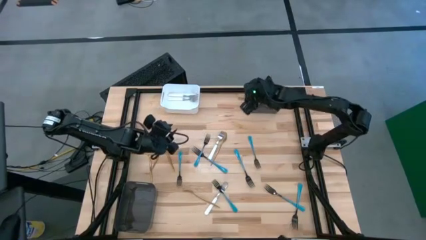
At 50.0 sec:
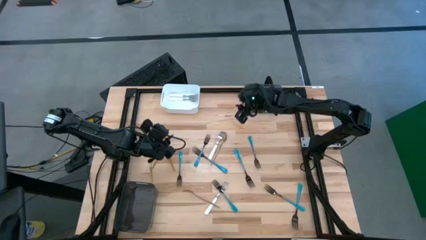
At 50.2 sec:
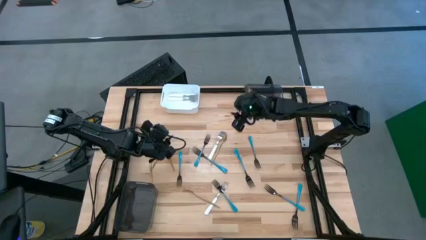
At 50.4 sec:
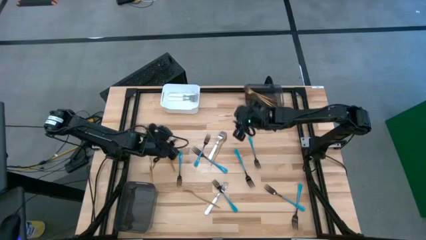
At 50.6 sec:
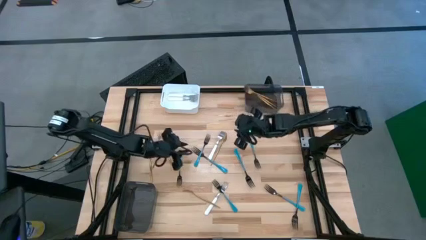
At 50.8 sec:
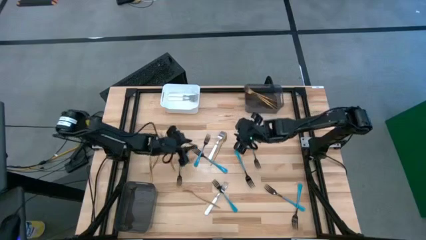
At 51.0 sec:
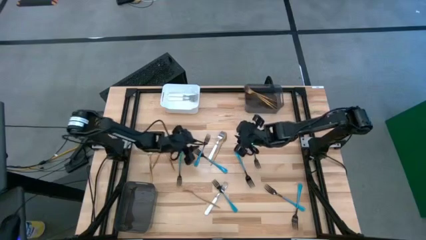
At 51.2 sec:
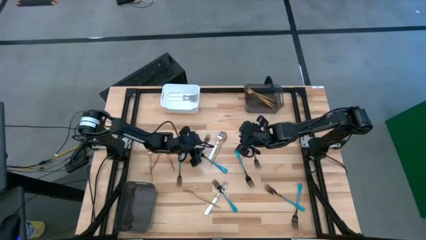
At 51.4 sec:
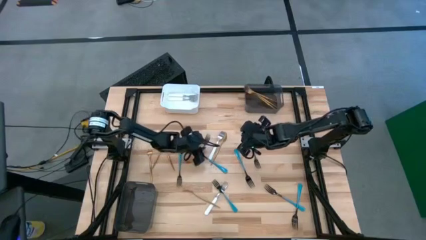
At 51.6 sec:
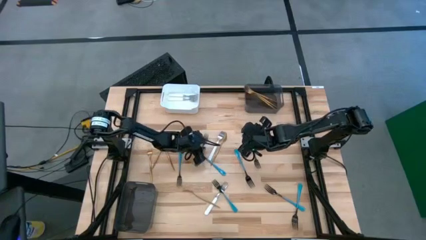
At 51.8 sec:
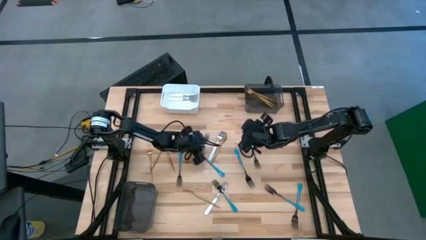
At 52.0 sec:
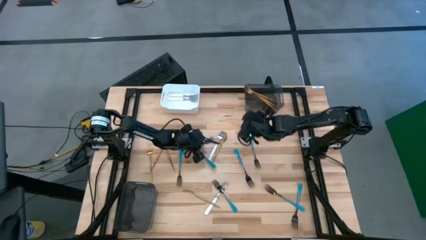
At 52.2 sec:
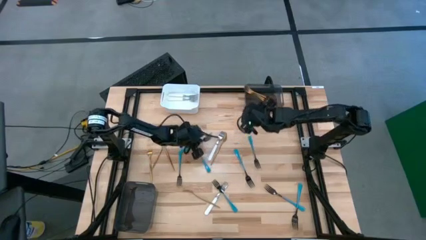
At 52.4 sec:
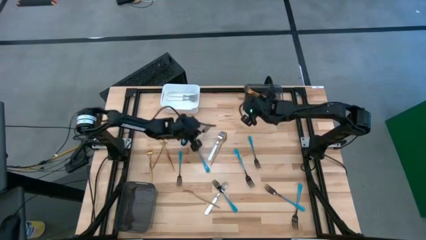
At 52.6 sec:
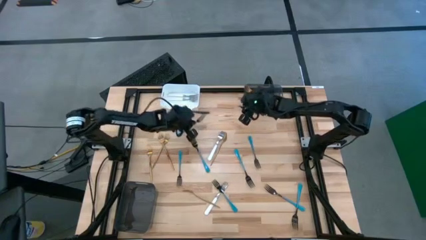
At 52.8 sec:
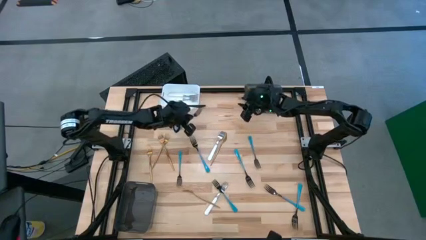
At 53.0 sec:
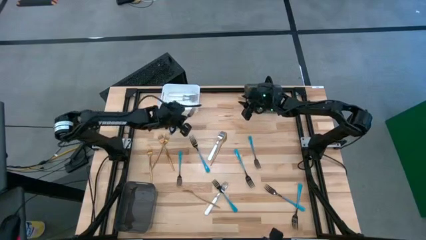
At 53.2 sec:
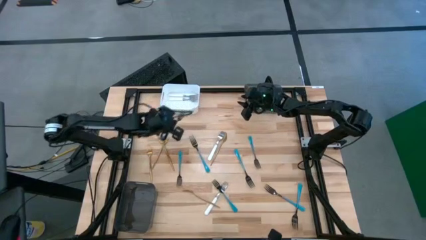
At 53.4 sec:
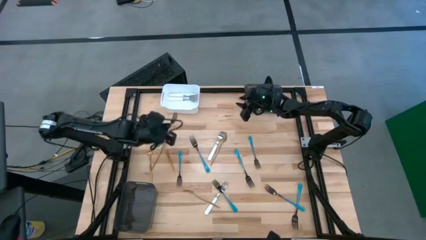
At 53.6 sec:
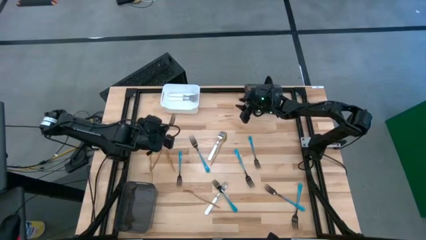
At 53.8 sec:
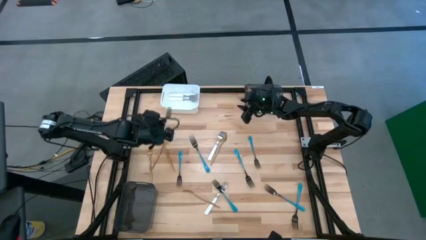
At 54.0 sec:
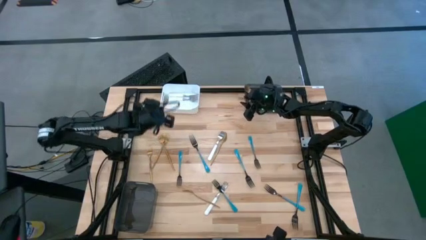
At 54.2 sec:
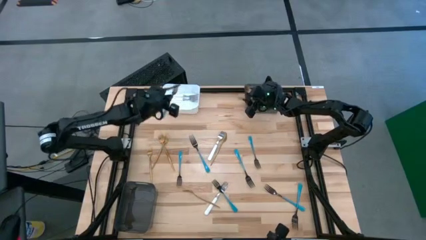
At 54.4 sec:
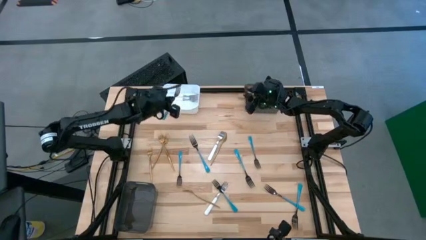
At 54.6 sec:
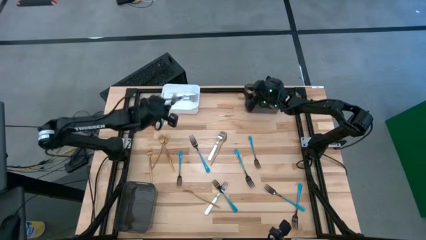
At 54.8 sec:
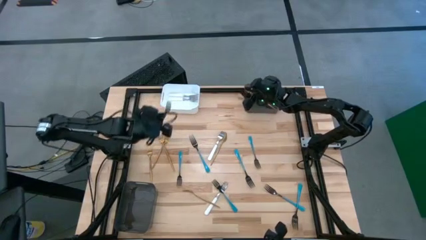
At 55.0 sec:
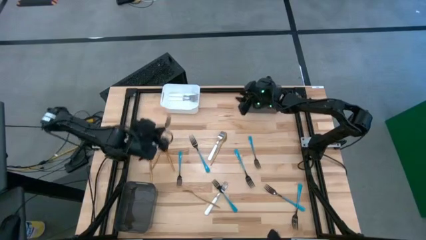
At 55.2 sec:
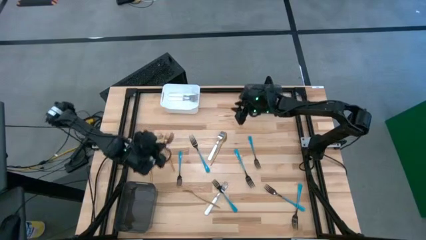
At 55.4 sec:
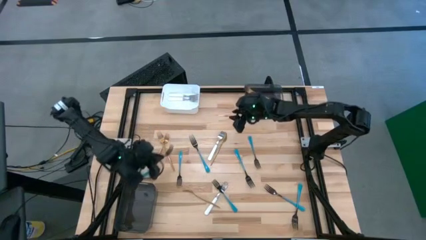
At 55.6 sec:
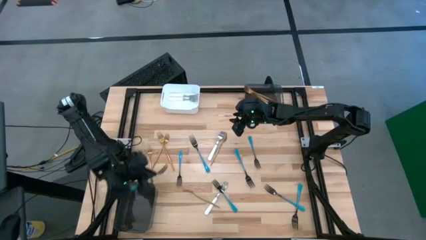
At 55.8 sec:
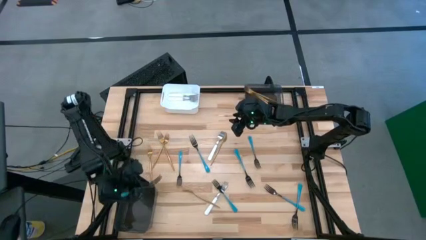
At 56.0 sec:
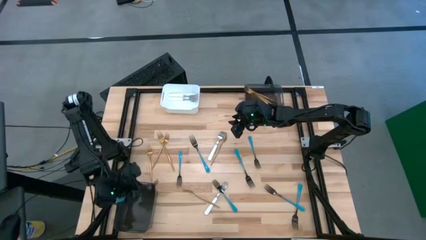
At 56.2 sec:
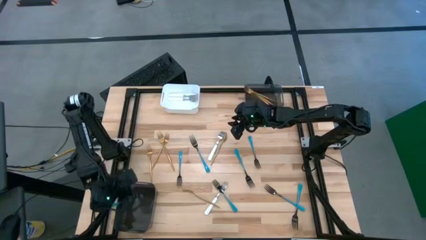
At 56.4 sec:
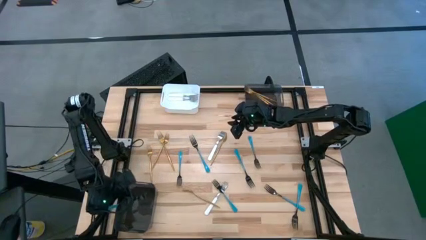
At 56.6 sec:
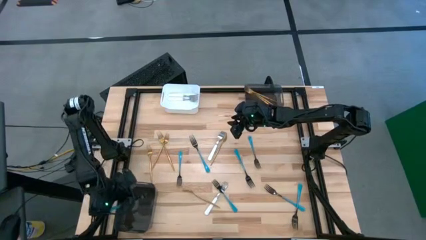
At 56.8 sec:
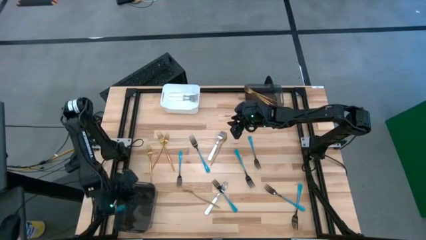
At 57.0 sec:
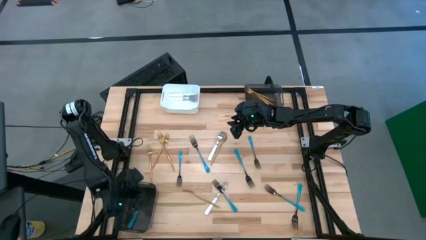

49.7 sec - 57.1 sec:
Task: Sort silverware by color (type)
Put the blue fork into the bottom black bin

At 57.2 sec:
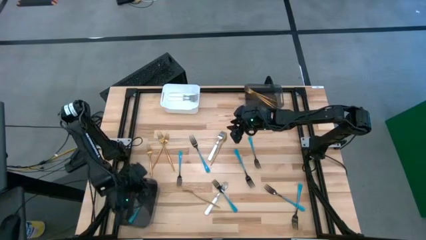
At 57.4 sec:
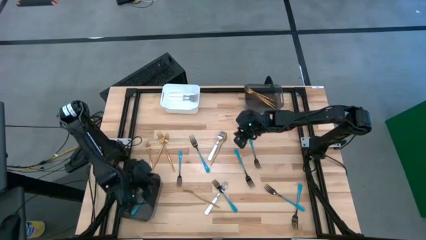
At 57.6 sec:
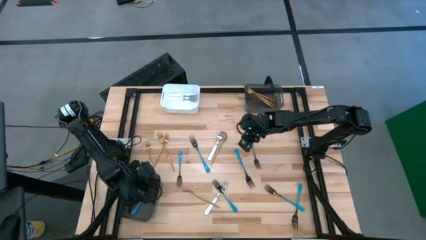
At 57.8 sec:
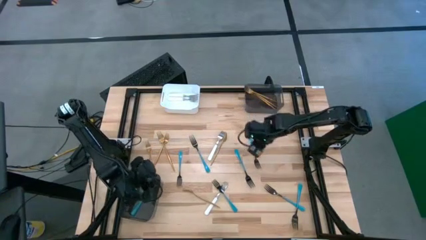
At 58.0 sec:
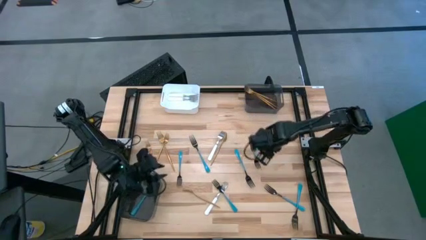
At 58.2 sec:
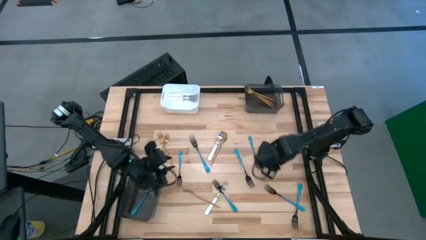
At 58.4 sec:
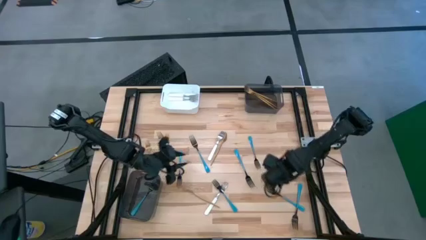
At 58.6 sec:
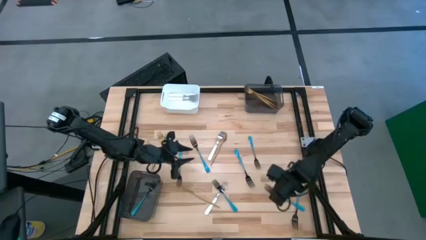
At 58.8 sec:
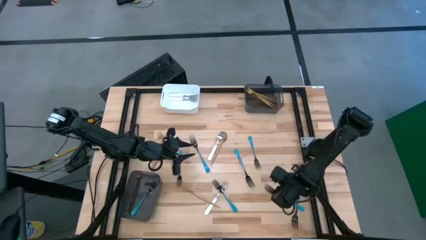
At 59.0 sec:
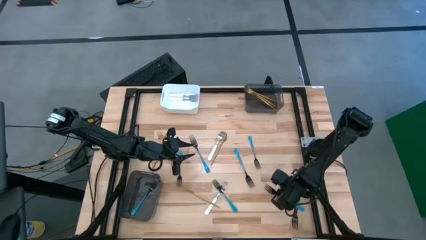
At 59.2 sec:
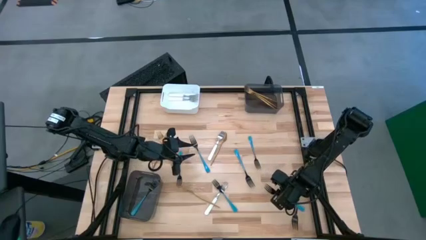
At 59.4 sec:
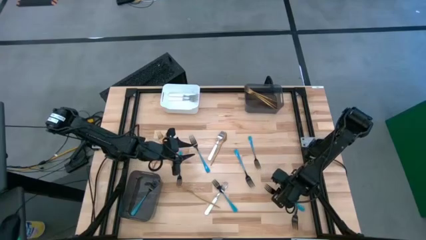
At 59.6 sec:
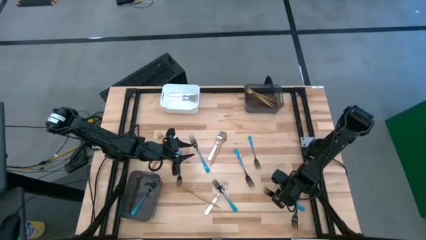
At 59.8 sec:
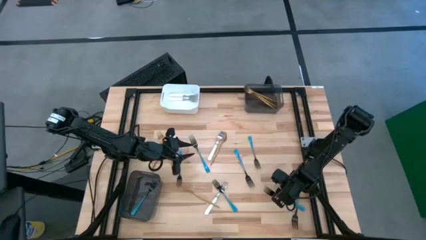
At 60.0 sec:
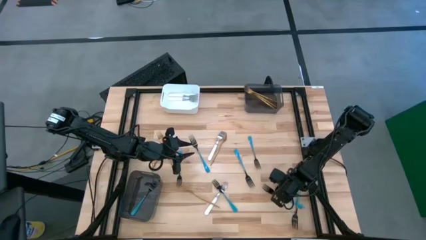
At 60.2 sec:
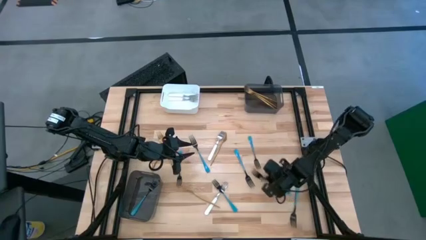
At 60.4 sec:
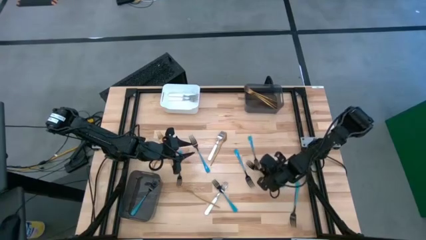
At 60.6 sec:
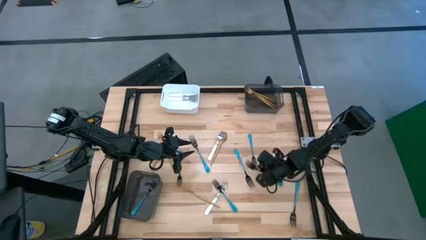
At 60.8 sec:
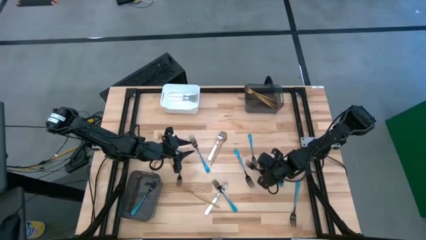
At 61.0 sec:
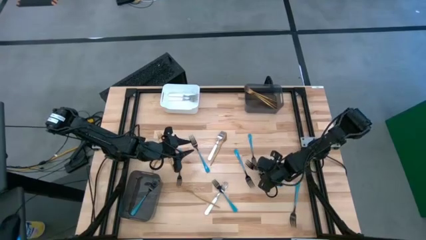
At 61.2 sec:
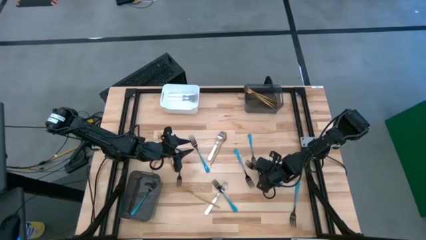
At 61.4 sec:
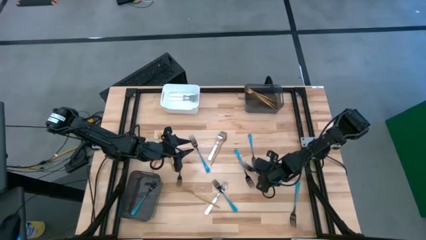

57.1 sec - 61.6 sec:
Put the blue fork into the bottom black bin

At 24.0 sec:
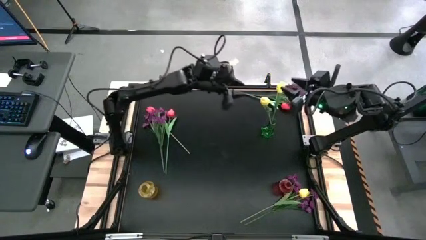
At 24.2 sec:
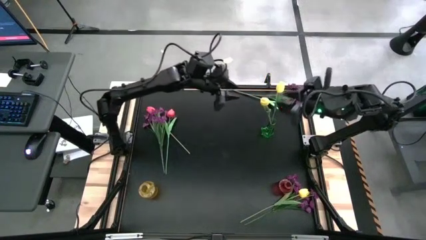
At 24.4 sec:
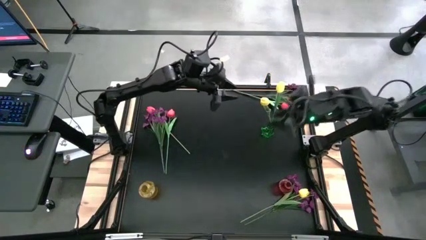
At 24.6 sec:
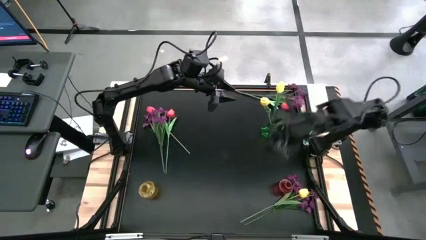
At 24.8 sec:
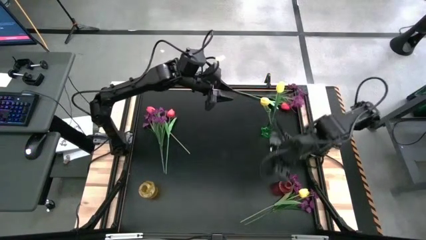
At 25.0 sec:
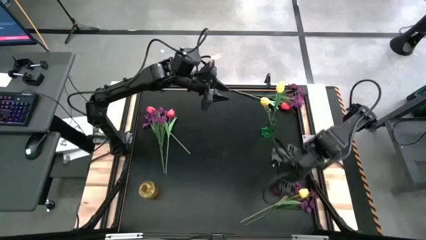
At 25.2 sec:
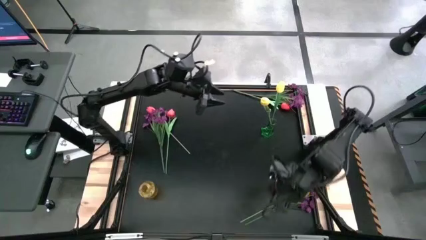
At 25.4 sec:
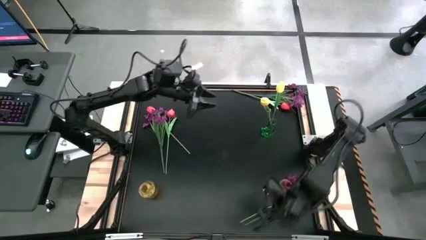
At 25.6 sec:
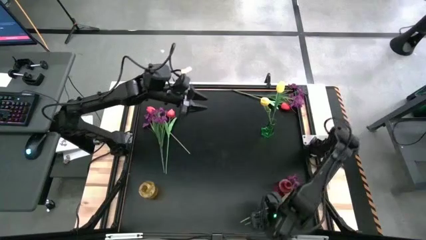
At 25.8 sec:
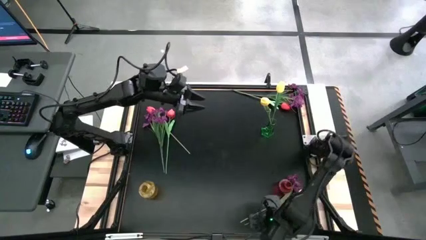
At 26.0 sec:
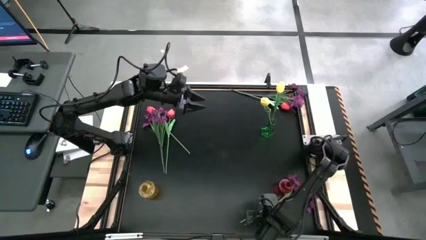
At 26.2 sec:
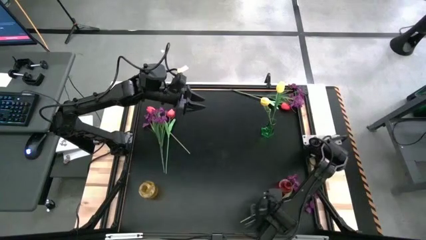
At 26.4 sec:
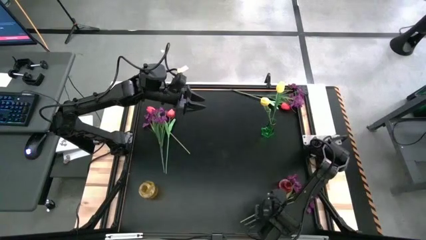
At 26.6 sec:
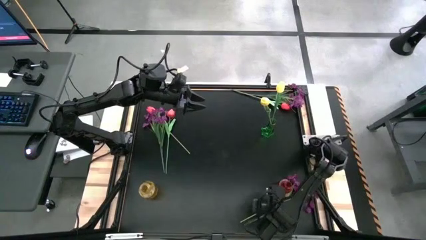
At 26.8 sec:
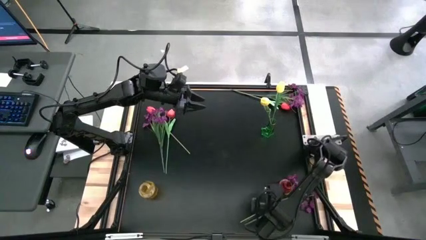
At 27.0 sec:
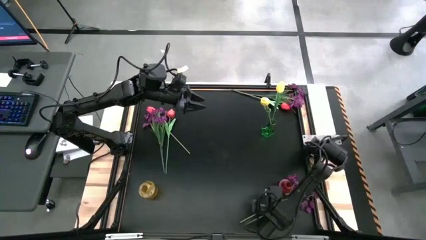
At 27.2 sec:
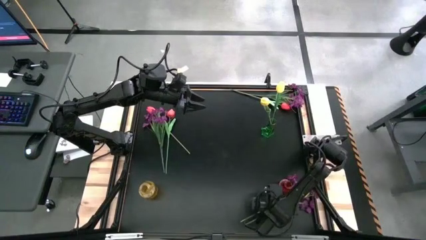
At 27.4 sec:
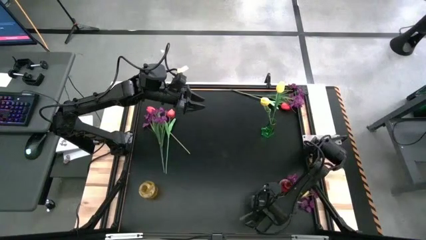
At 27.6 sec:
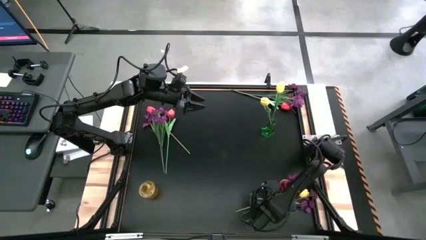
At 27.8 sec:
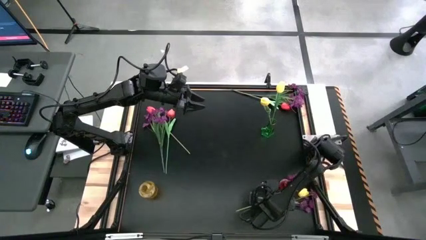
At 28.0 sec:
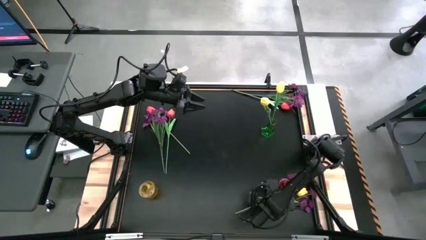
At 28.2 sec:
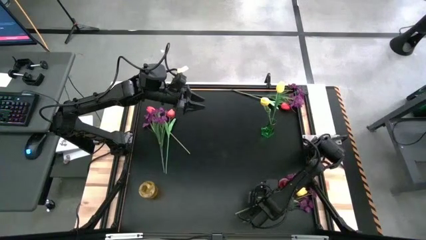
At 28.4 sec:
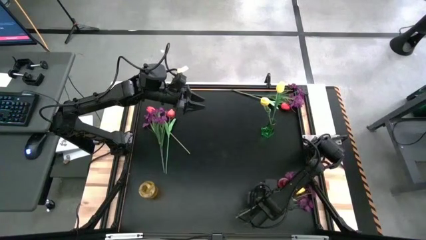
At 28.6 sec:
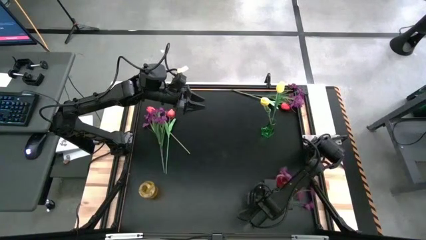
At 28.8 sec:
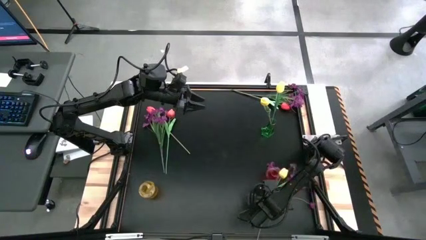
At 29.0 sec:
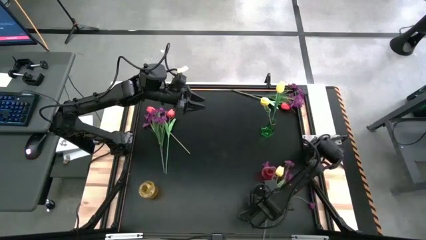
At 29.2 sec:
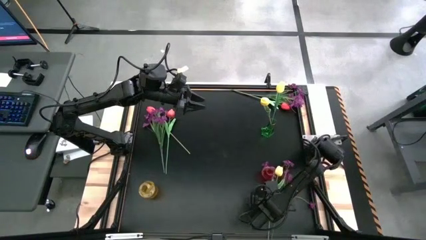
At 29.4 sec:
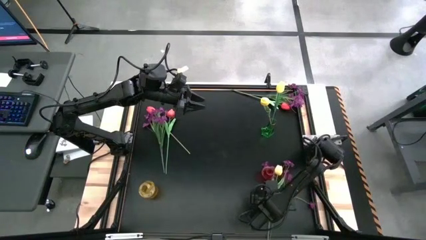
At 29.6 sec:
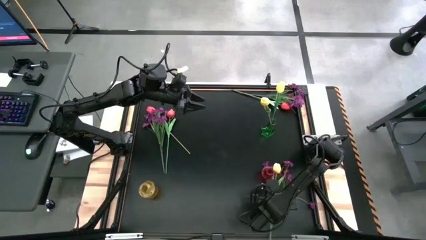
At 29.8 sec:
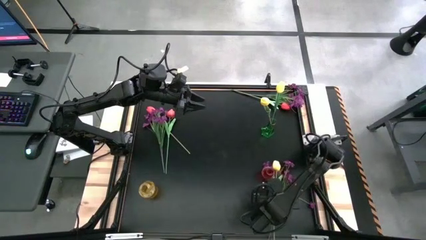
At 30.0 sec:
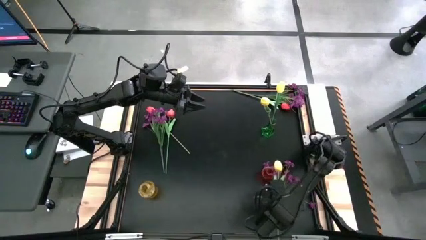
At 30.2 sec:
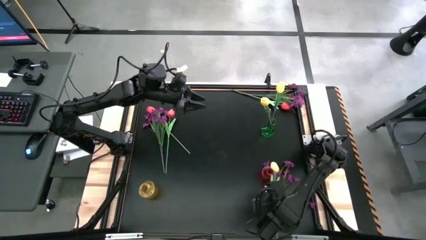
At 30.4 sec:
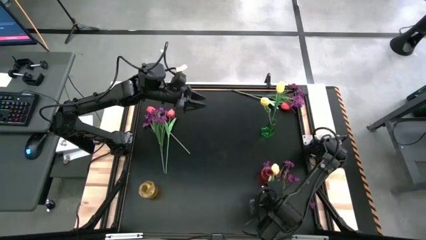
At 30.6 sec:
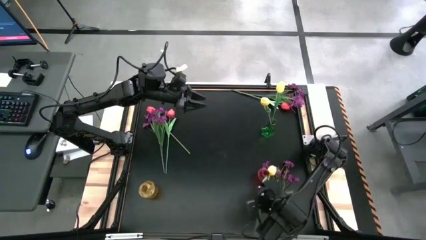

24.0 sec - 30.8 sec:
Task: Sort flowers into vase by color
Put the yellow tulip into the green flower vase
